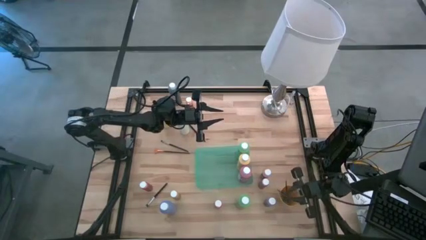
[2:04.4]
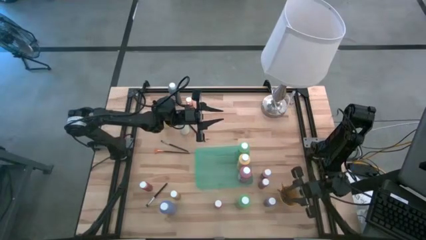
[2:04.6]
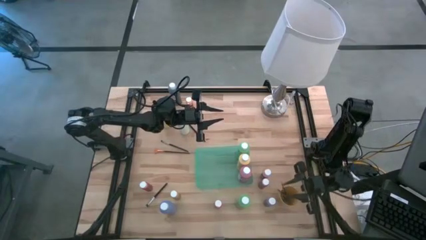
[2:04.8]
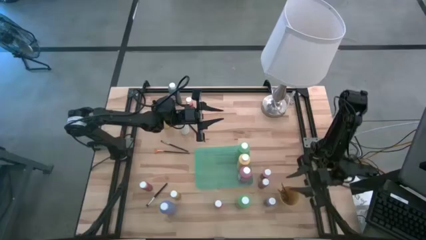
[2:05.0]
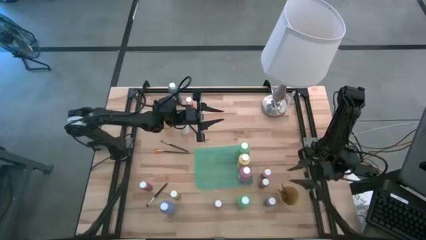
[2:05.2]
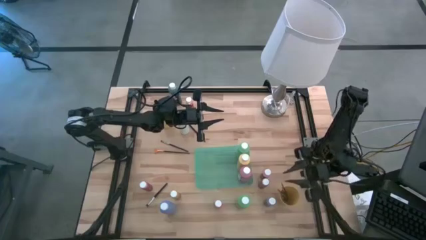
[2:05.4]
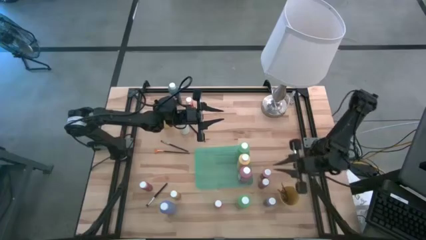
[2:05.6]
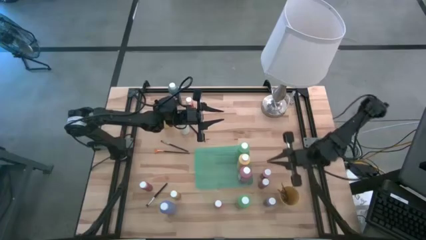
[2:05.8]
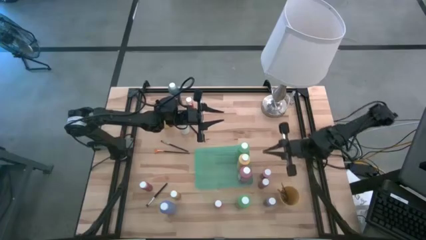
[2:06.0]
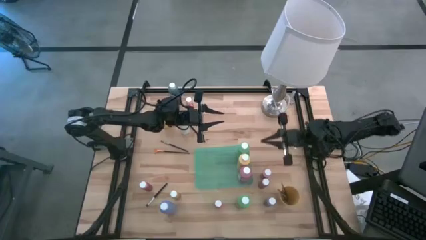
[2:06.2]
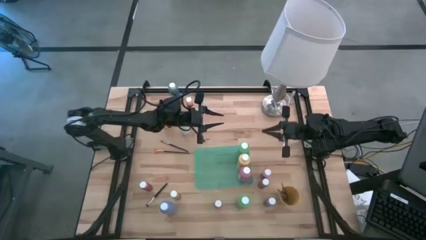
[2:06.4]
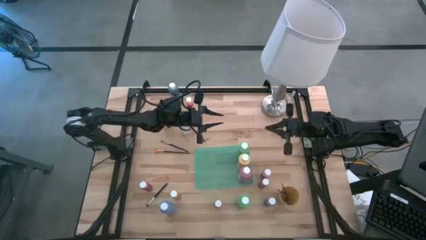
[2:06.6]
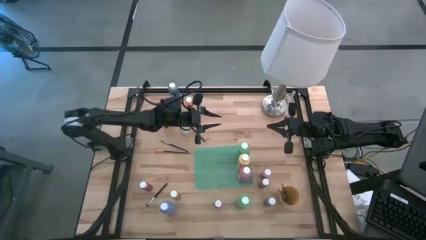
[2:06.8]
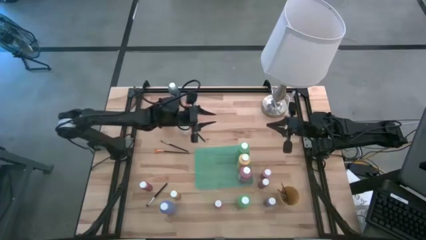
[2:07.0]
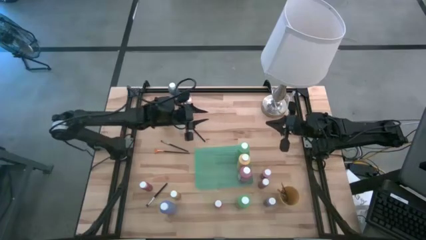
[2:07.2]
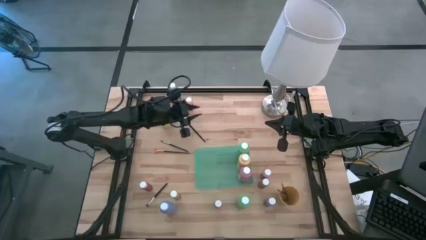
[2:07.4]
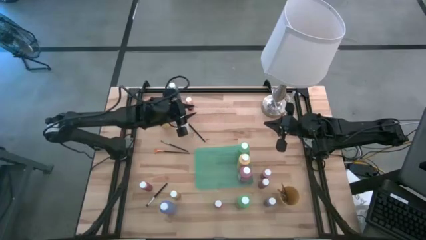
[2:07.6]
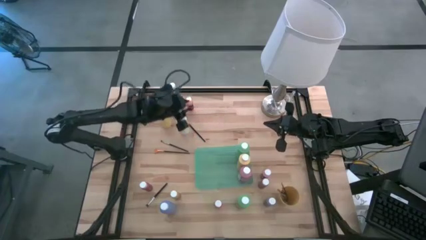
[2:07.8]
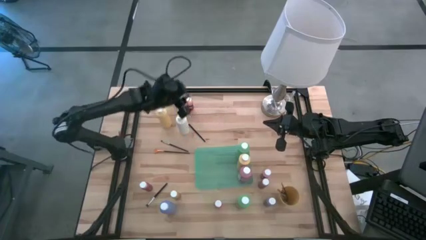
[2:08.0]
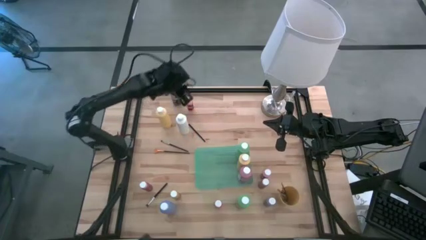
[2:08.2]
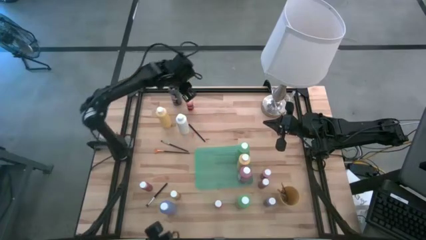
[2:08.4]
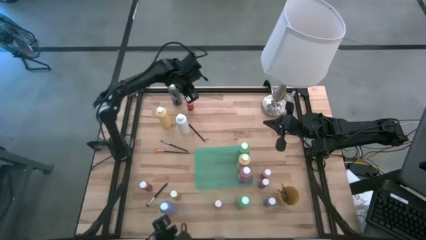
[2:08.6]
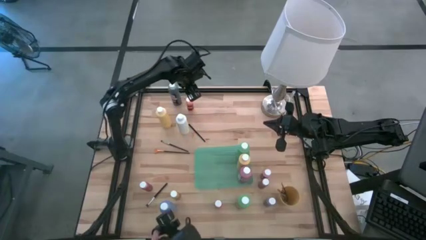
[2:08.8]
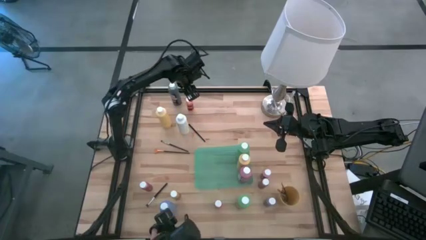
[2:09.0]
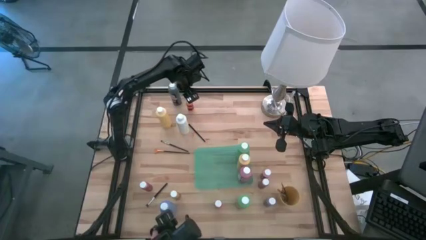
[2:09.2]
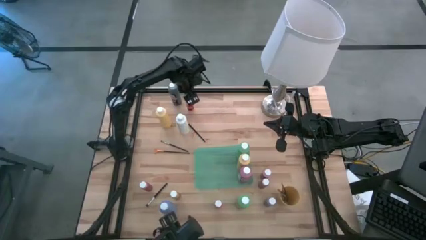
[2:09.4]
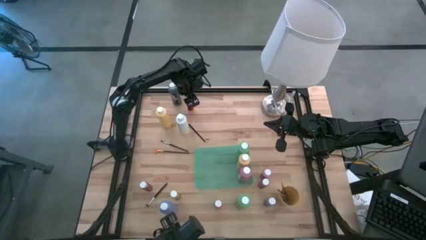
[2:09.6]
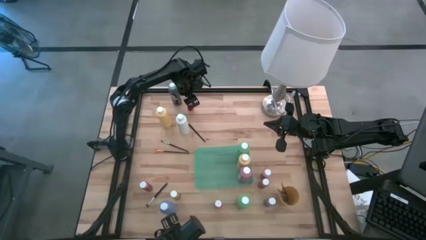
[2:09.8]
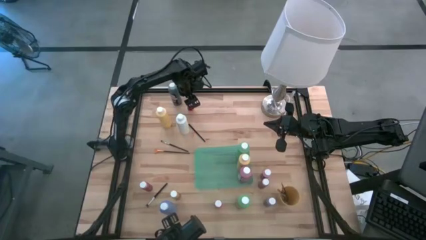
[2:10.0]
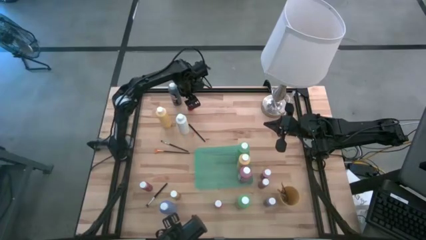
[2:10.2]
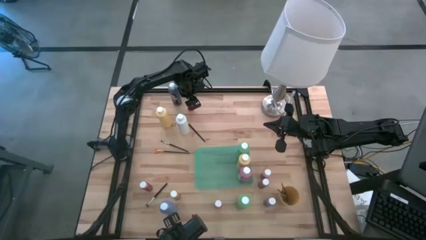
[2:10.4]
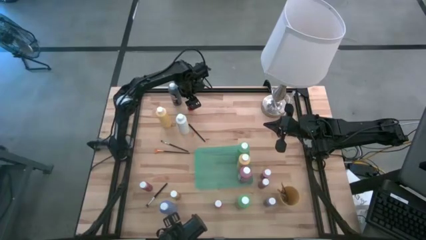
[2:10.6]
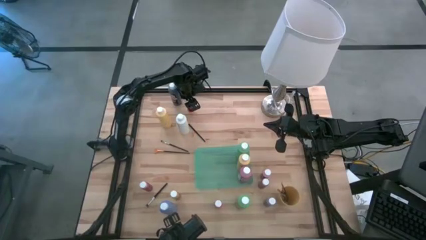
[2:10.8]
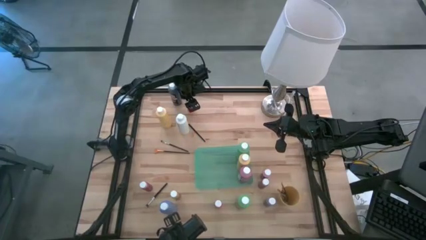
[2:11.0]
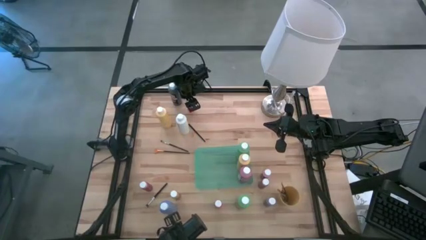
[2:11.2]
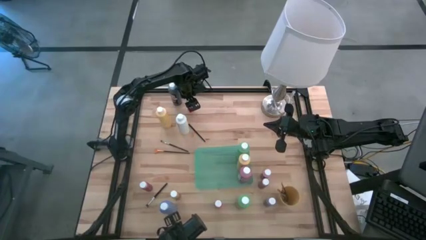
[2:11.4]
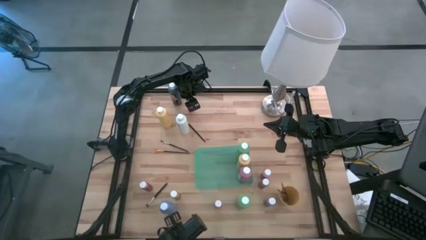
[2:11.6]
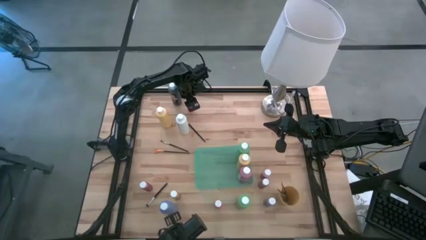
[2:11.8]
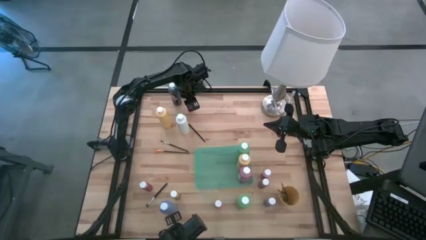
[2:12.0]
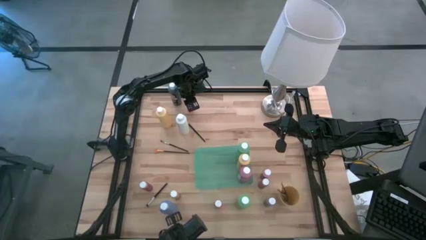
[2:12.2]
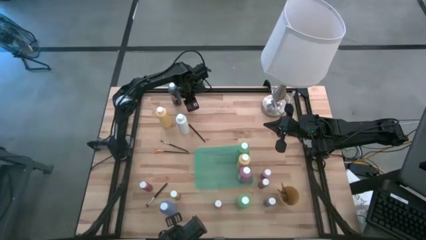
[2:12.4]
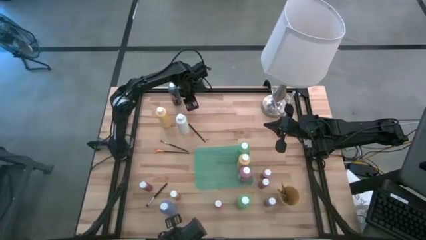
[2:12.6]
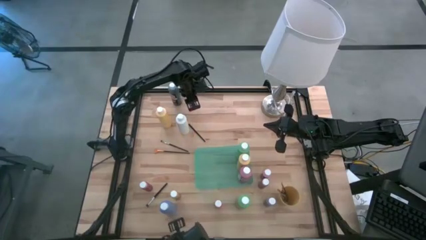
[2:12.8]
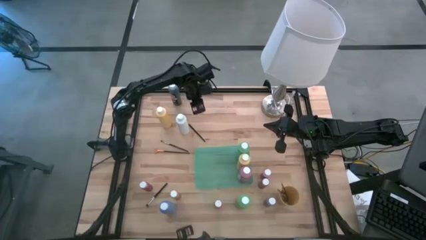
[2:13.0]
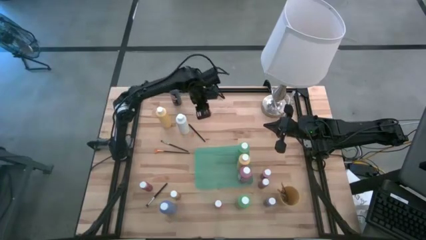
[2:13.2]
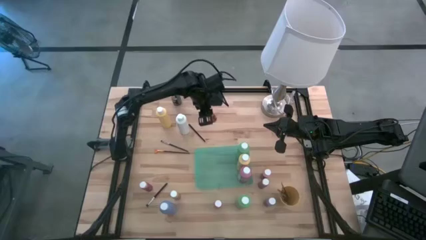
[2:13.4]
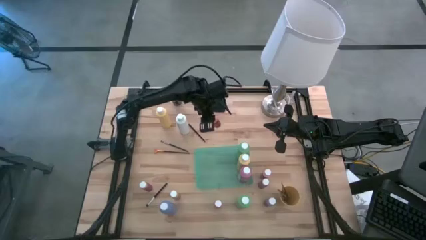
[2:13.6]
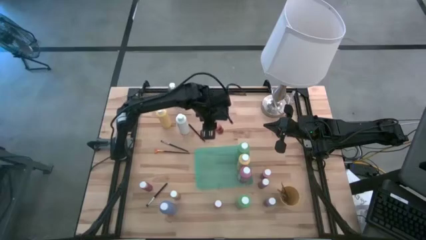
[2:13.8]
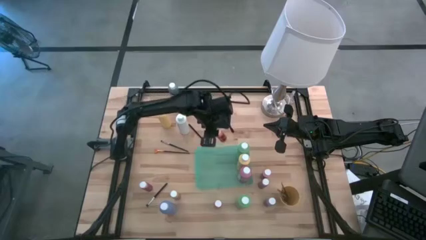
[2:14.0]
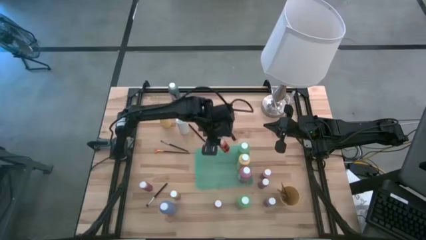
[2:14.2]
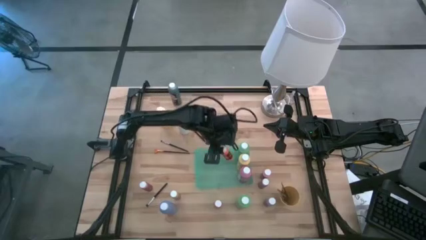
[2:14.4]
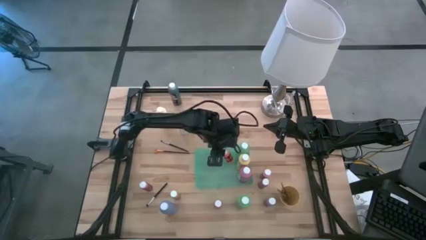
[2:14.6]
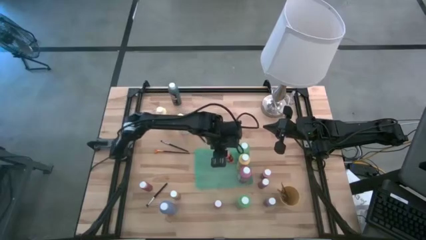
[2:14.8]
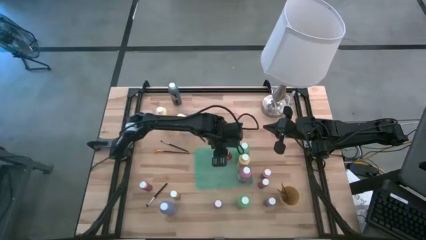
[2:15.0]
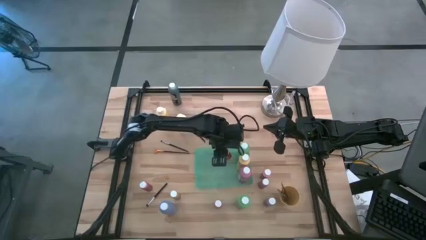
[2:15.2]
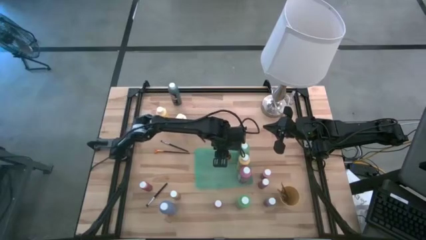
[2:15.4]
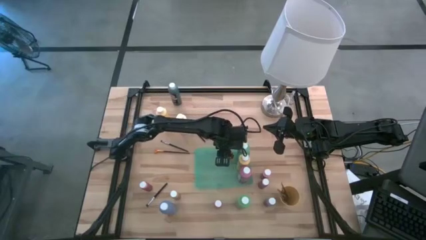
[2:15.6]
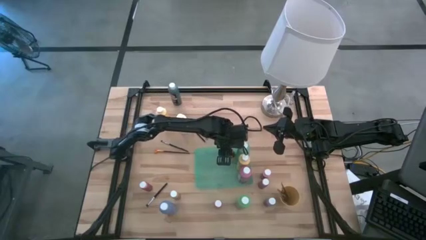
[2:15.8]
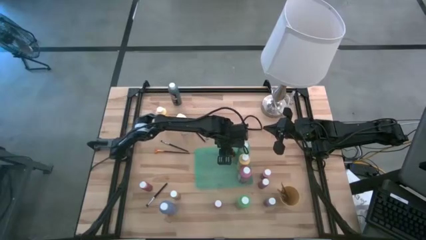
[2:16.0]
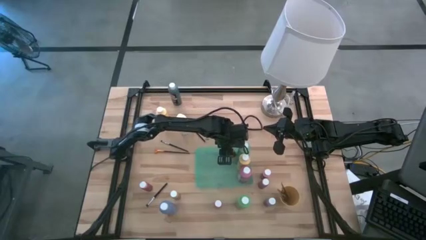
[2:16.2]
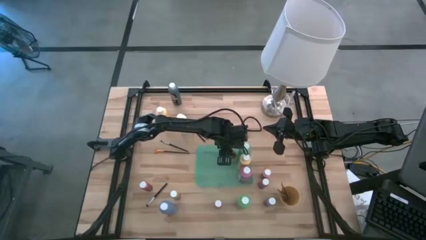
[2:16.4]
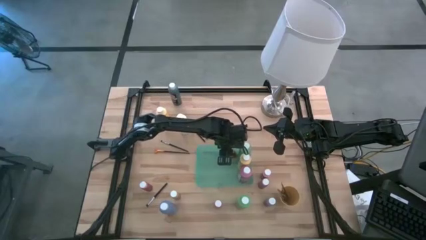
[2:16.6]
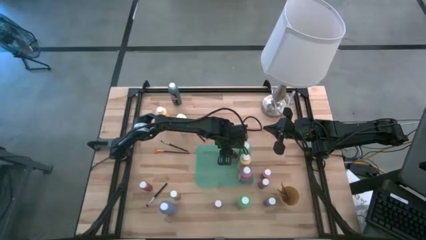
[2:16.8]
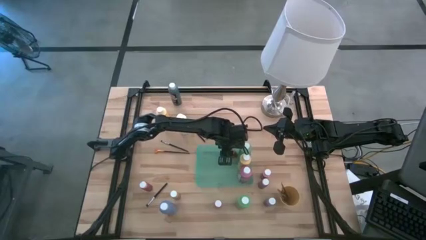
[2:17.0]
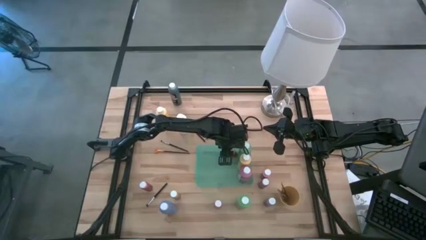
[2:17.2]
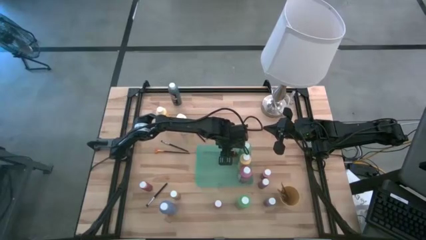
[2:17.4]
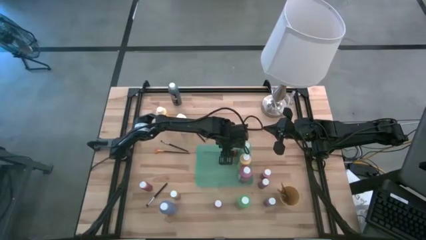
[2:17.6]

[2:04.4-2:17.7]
Task: Pick & Place Paint Supplies
Put the orange paint bottle into the green bin
